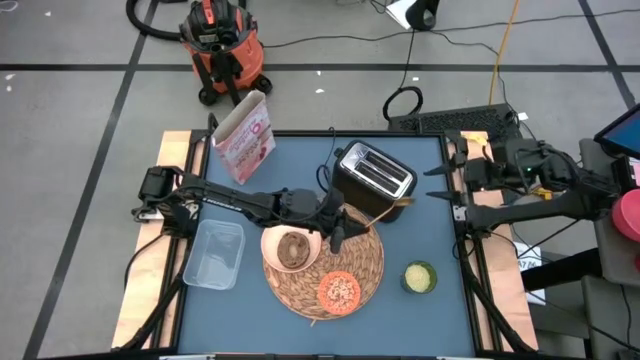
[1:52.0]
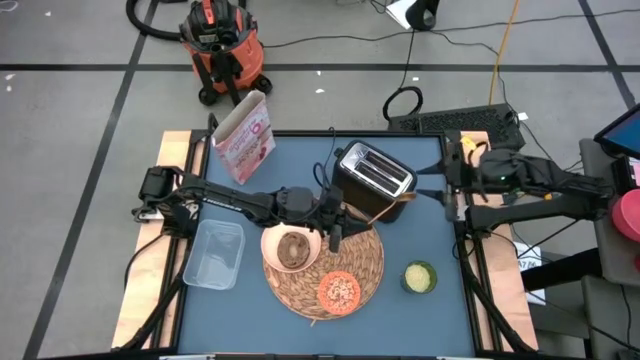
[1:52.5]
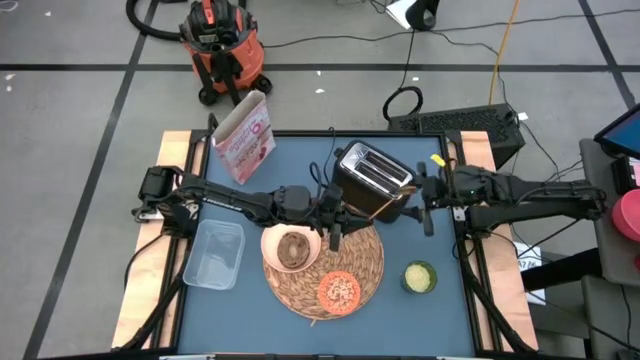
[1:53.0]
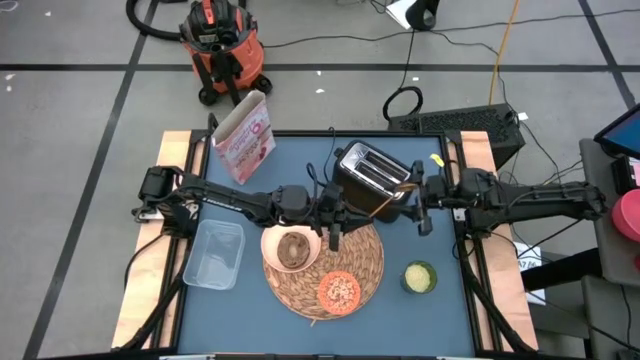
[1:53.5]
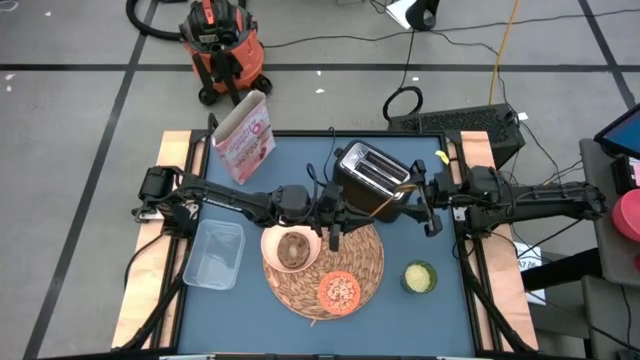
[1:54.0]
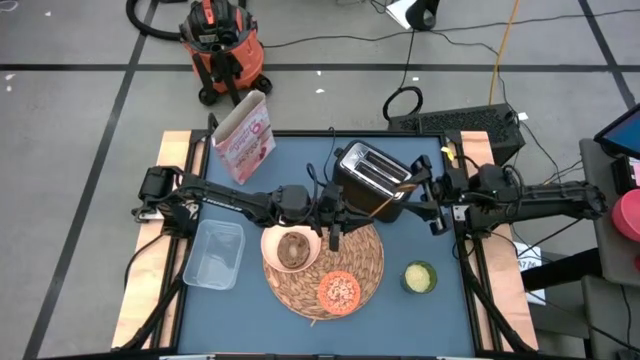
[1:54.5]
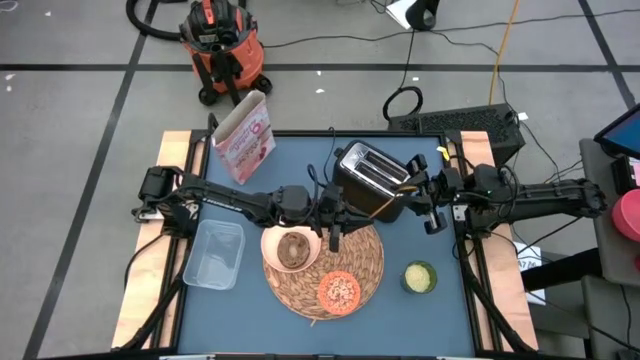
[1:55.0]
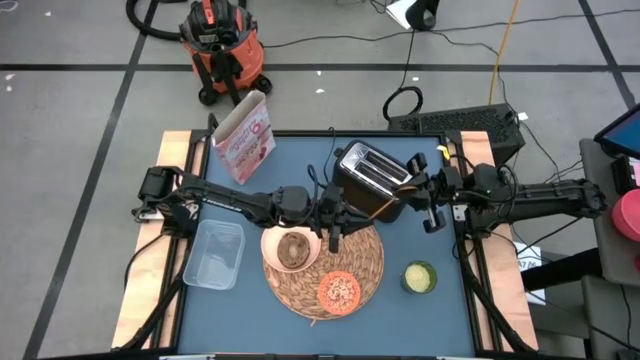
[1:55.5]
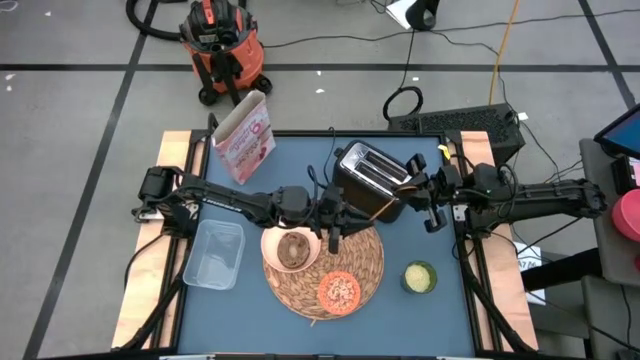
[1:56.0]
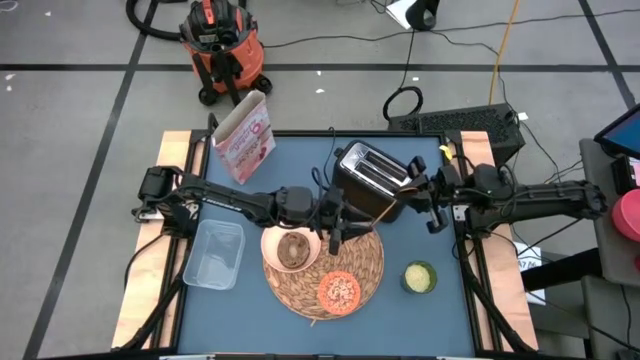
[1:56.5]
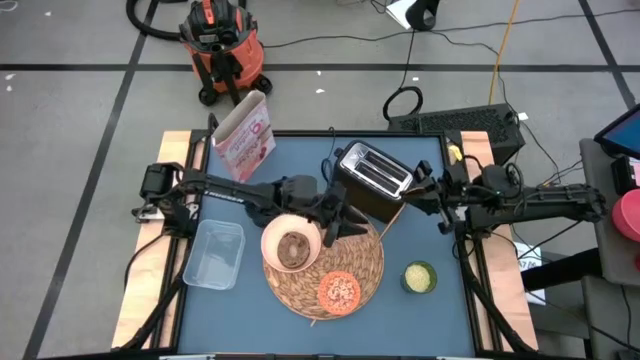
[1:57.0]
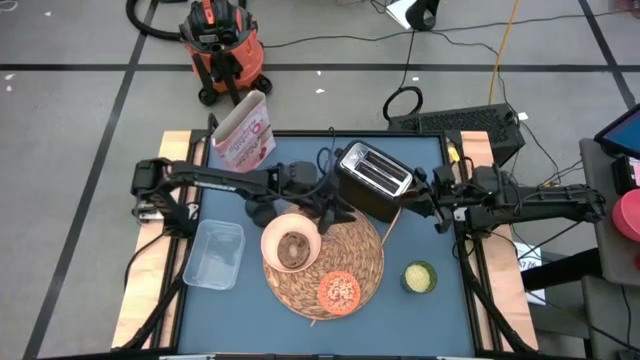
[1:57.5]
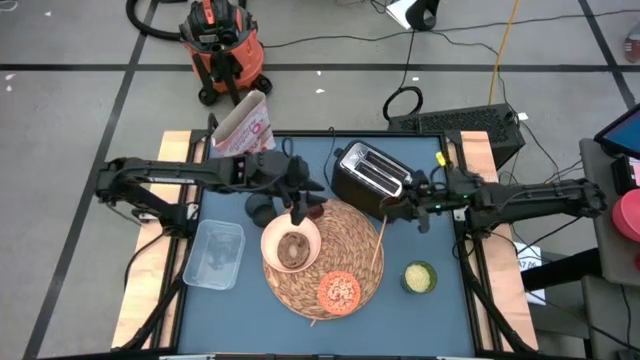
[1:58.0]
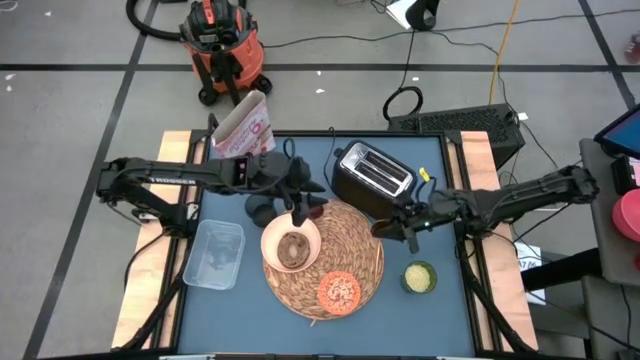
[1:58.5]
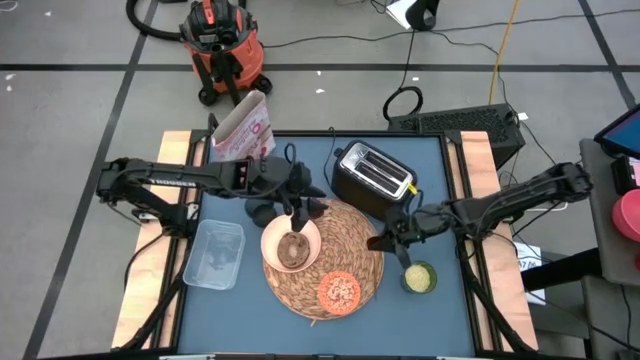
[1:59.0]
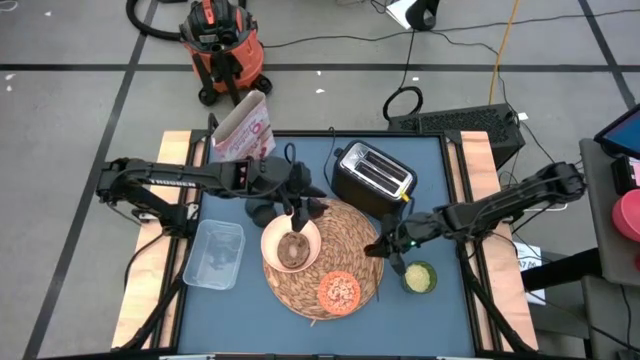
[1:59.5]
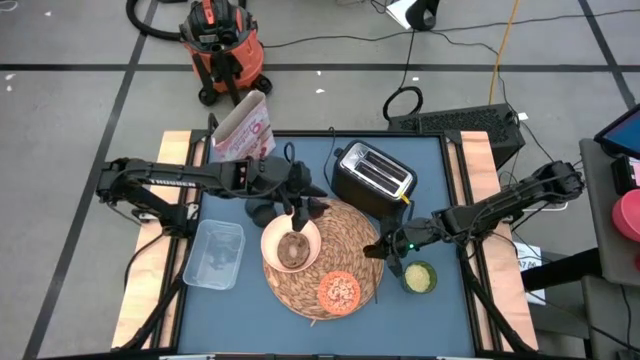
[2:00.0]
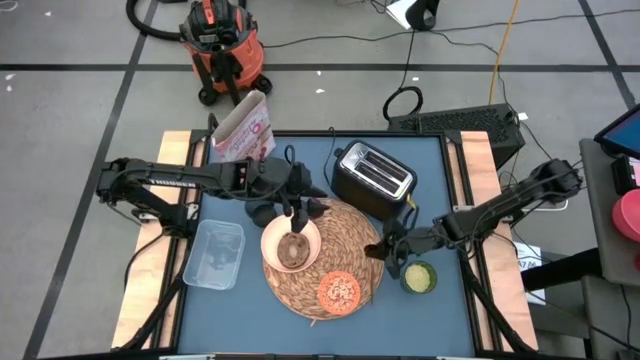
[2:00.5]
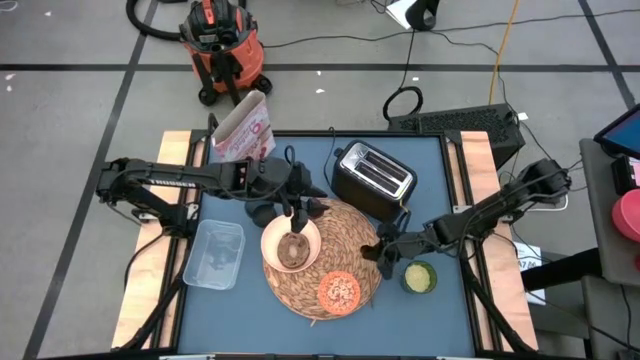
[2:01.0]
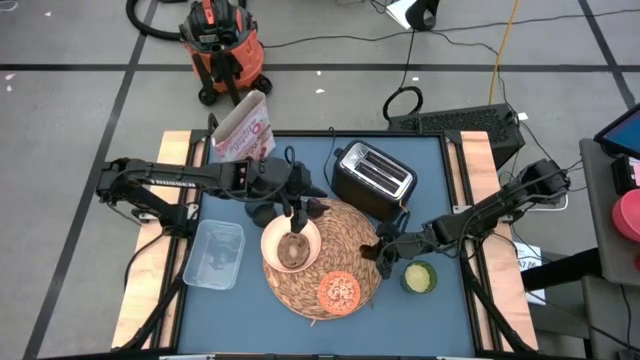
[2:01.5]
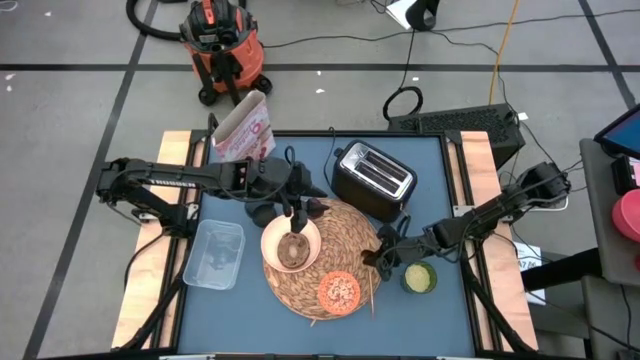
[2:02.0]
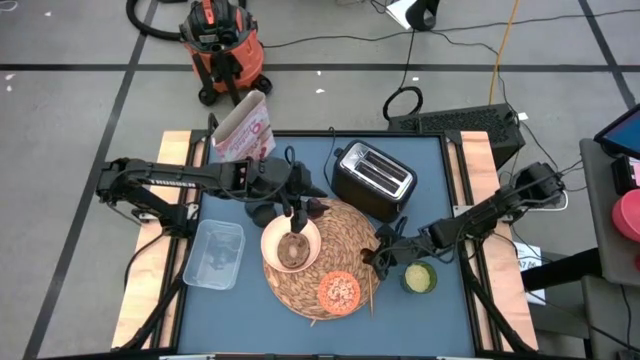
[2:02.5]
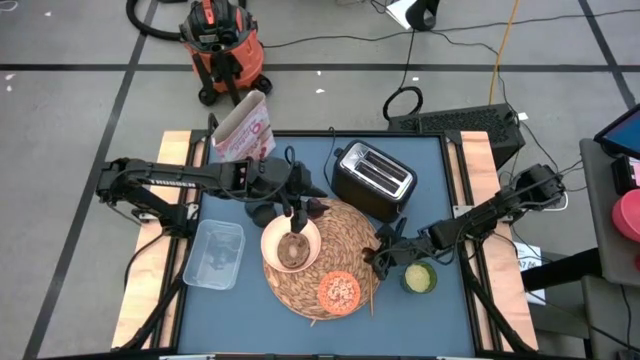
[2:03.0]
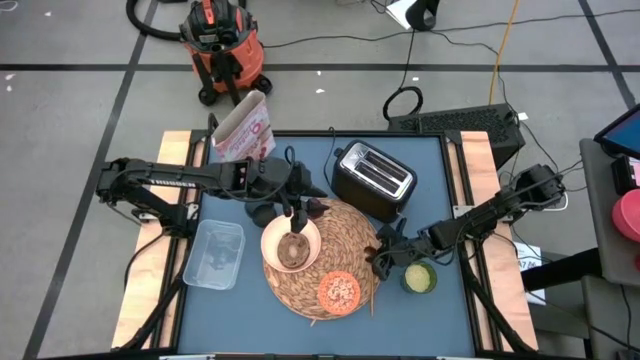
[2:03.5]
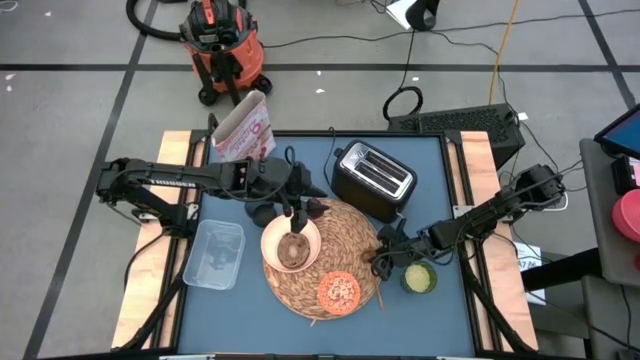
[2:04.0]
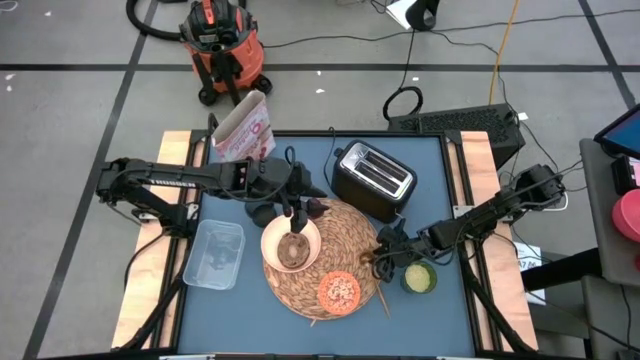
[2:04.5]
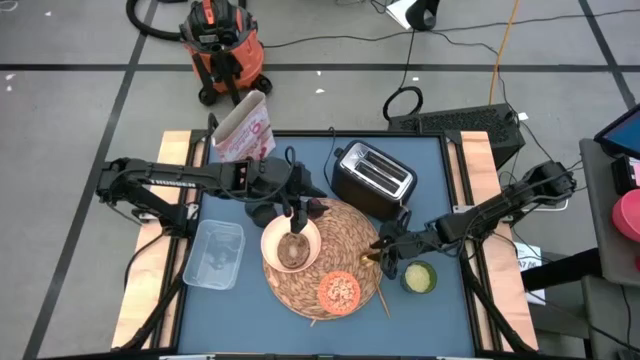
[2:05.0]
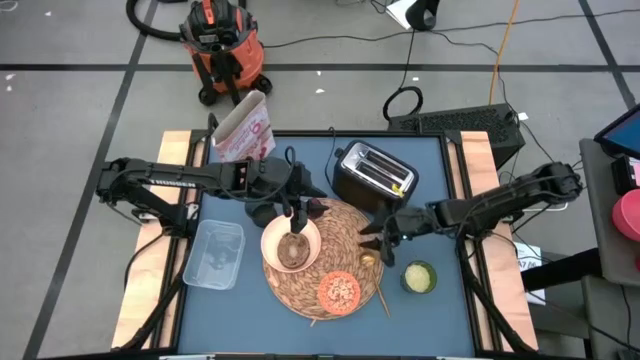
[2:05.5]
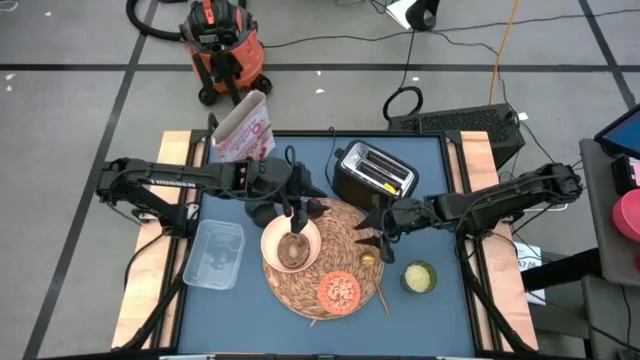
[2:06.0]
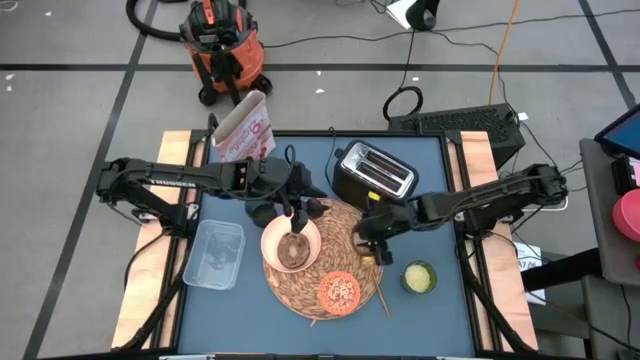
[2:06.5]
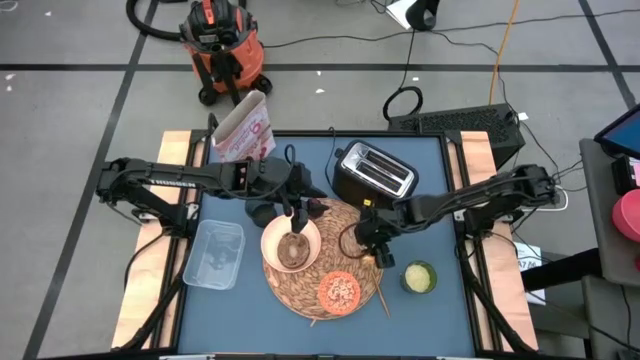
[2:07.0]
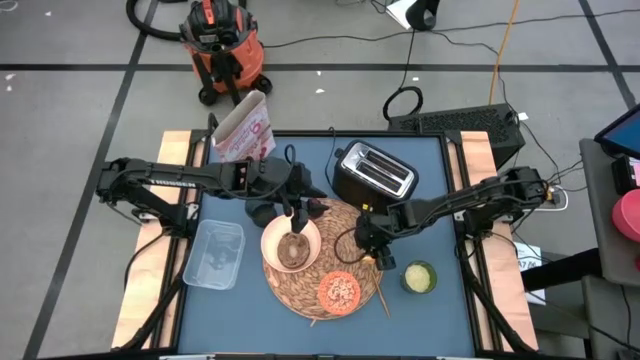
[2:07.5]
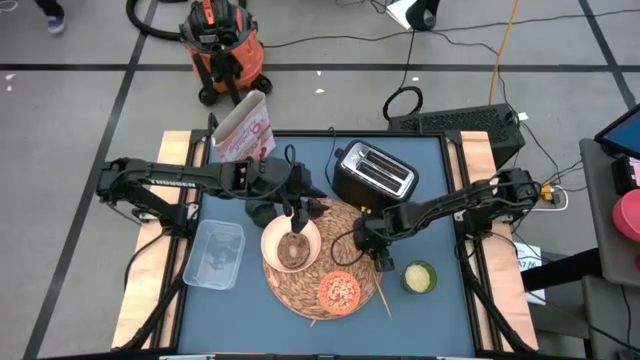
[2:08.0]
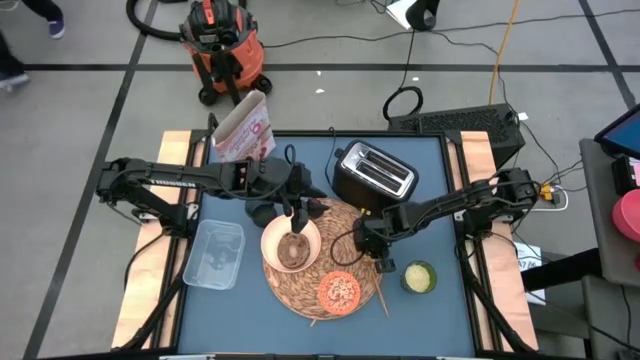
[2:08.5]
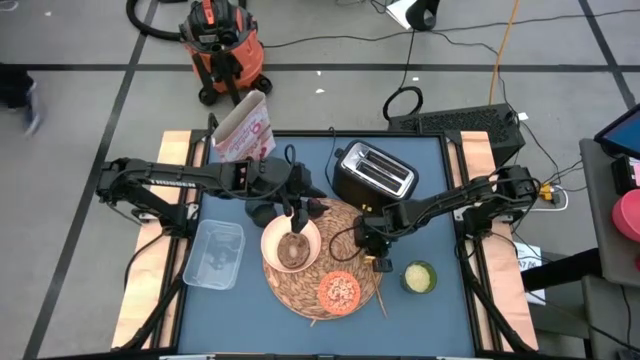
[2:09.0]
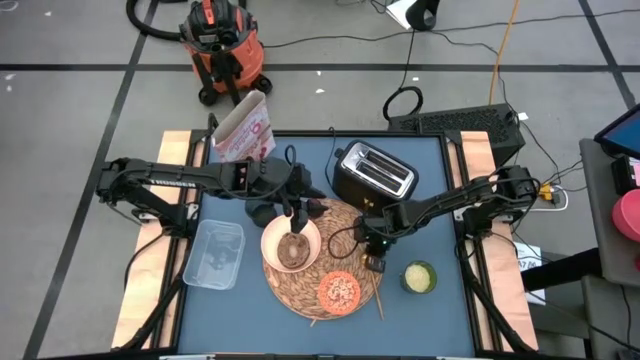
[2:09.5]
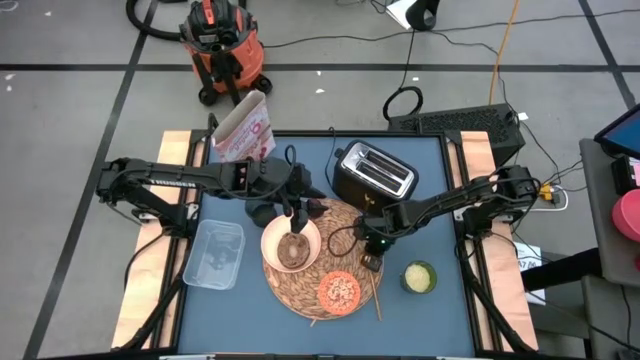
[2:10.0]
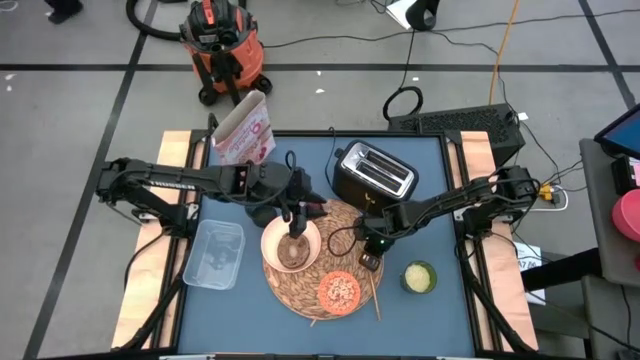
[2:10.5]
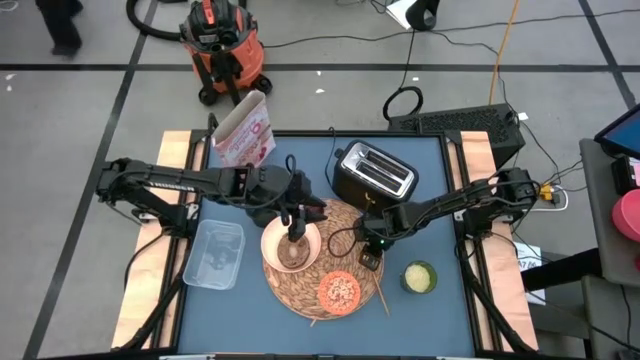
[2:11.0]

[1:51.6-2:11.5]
Task: Arrange a breakfast setting
Put the gold spoon on the placemat beside the orange bowl
